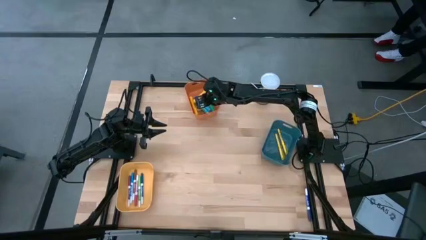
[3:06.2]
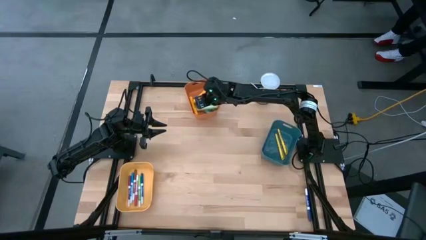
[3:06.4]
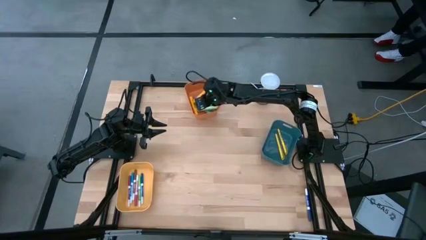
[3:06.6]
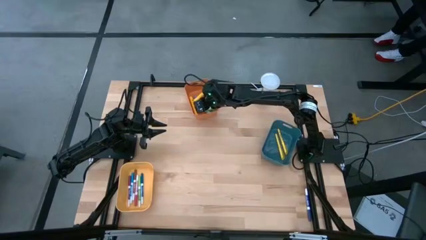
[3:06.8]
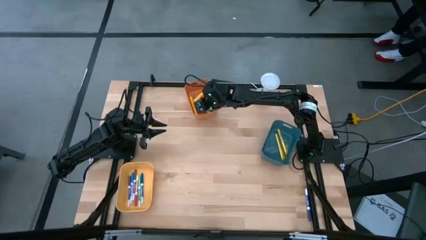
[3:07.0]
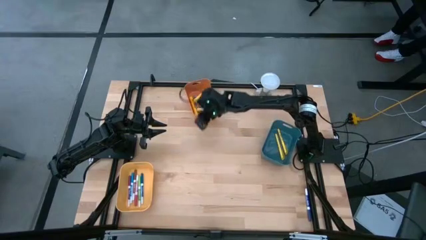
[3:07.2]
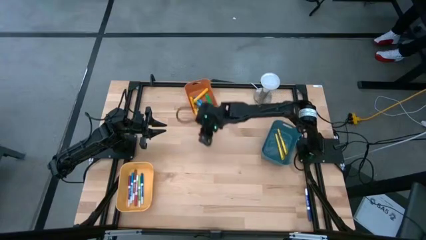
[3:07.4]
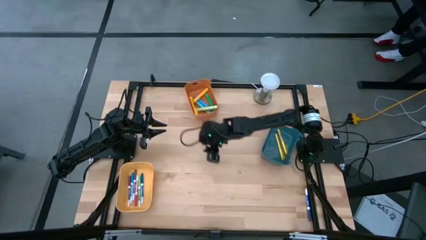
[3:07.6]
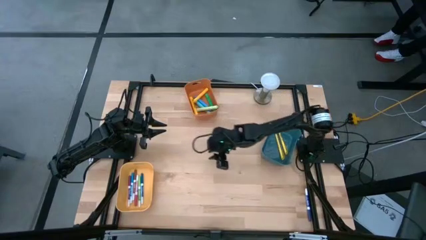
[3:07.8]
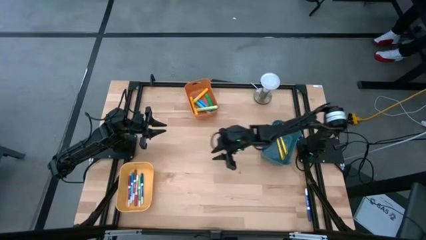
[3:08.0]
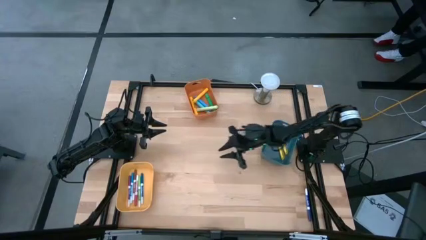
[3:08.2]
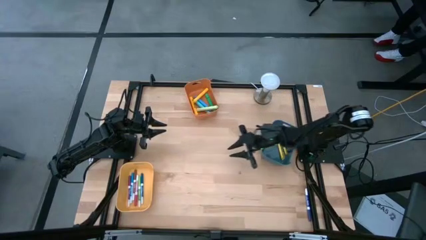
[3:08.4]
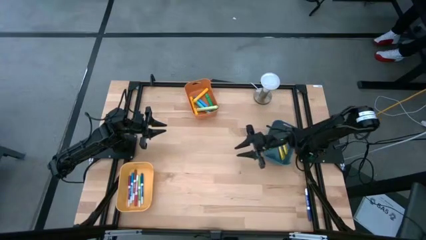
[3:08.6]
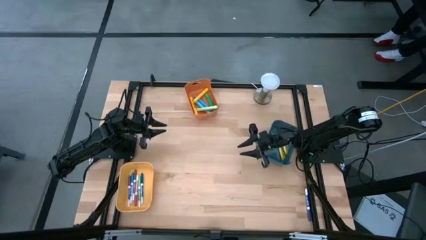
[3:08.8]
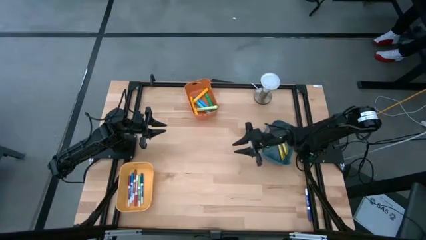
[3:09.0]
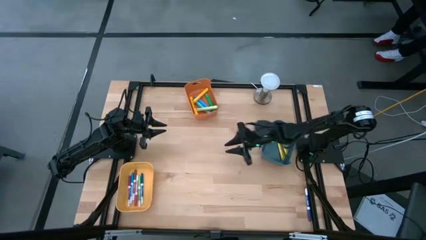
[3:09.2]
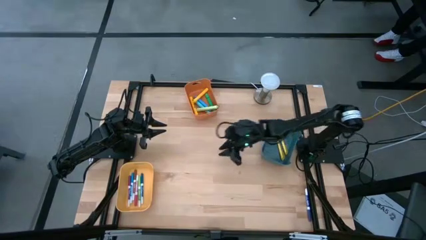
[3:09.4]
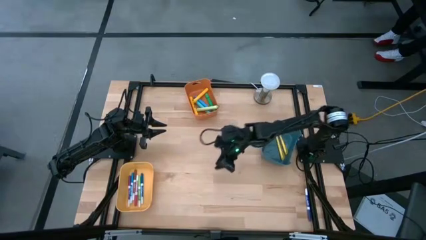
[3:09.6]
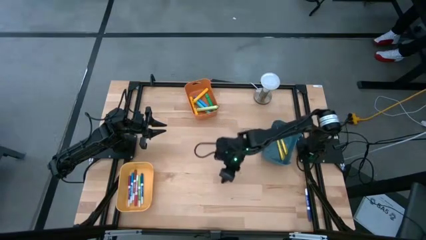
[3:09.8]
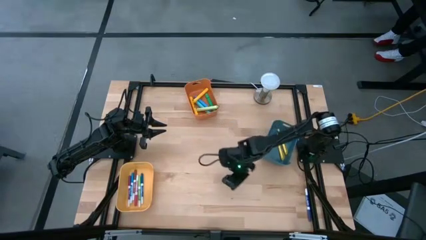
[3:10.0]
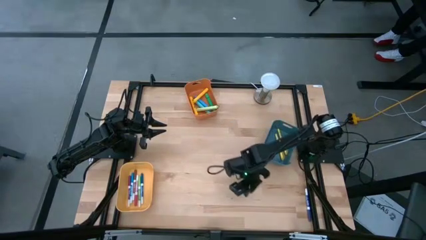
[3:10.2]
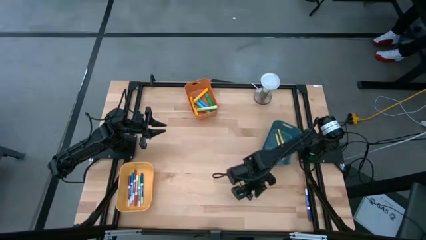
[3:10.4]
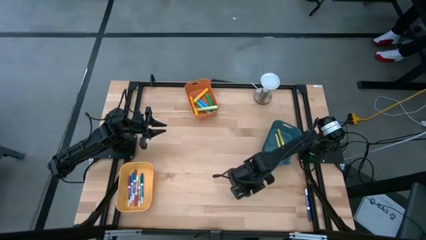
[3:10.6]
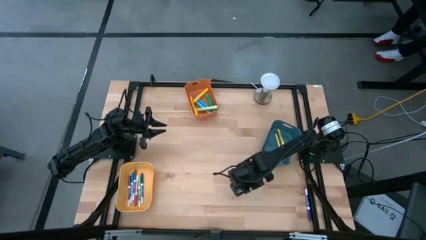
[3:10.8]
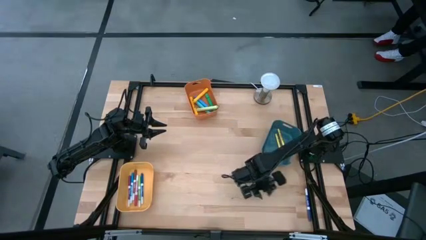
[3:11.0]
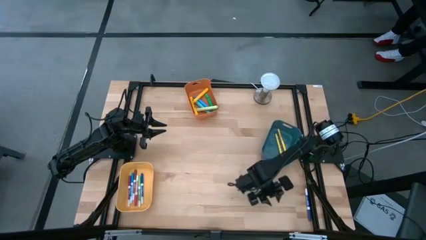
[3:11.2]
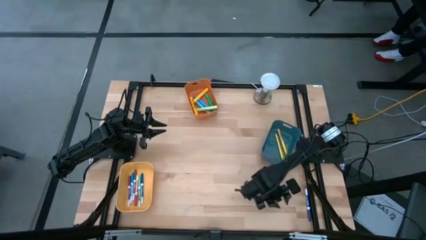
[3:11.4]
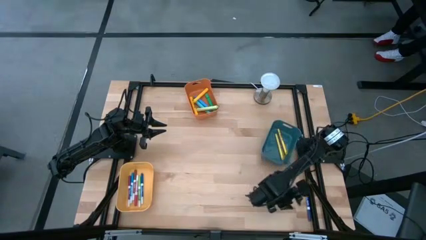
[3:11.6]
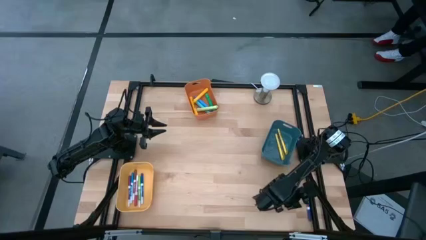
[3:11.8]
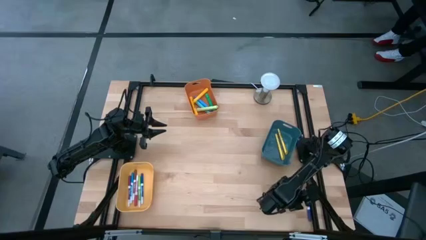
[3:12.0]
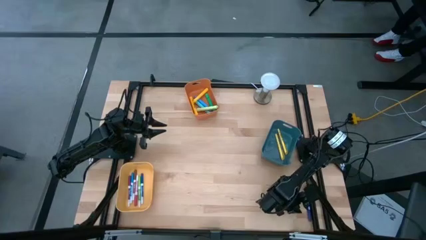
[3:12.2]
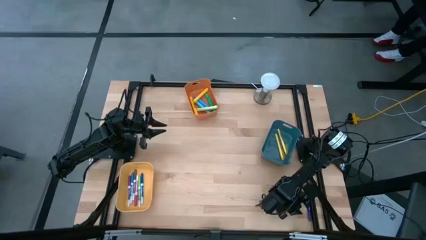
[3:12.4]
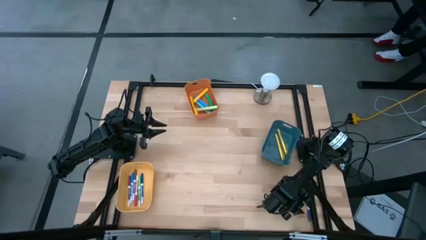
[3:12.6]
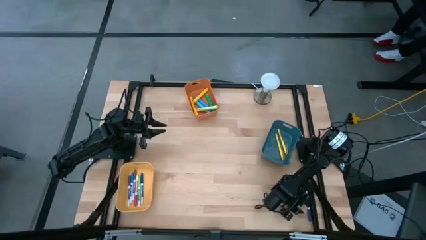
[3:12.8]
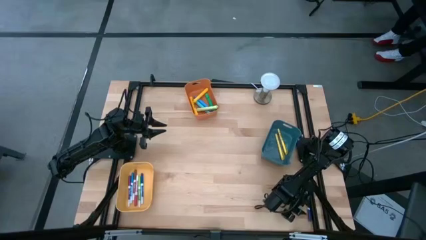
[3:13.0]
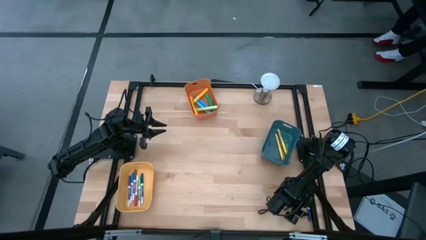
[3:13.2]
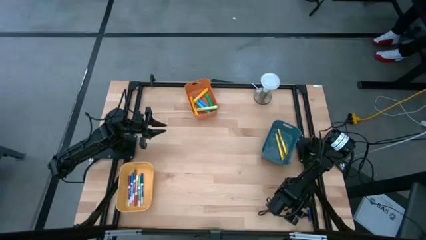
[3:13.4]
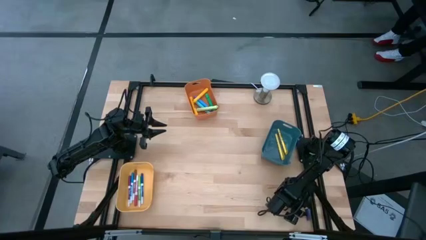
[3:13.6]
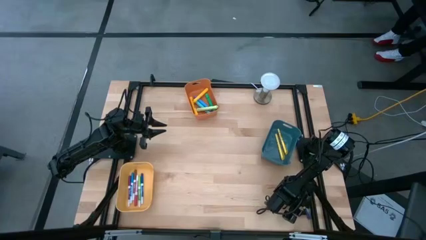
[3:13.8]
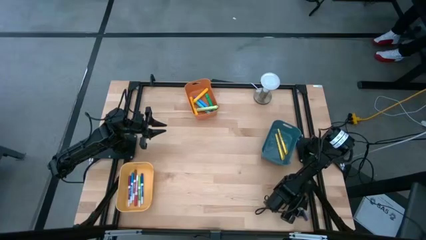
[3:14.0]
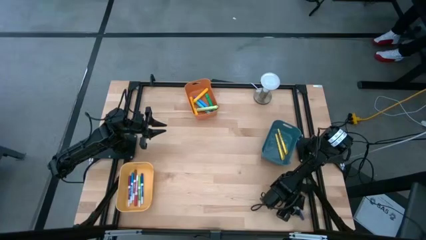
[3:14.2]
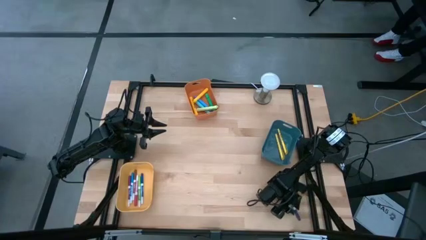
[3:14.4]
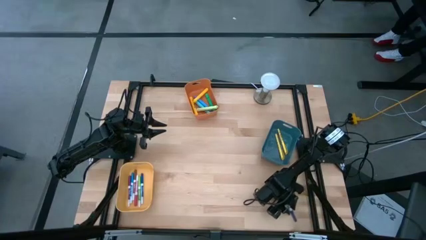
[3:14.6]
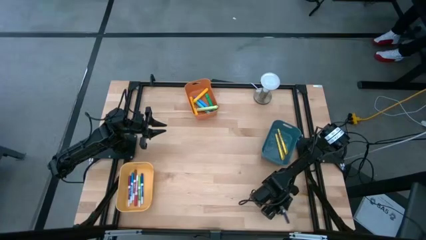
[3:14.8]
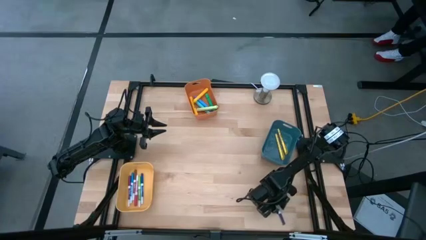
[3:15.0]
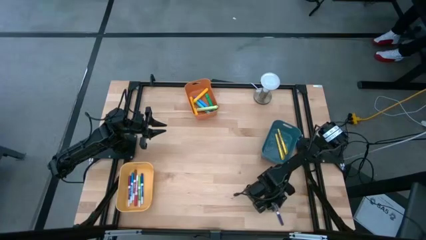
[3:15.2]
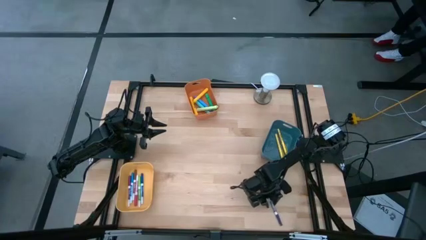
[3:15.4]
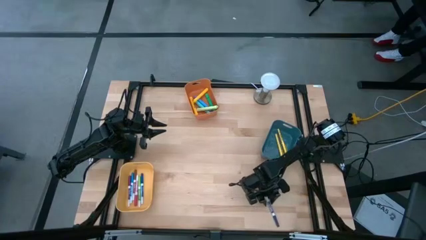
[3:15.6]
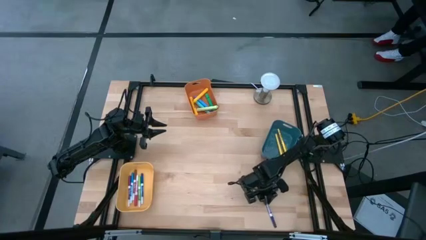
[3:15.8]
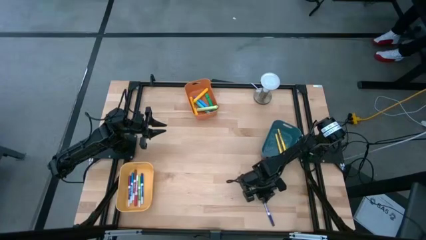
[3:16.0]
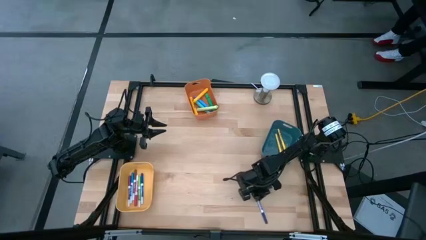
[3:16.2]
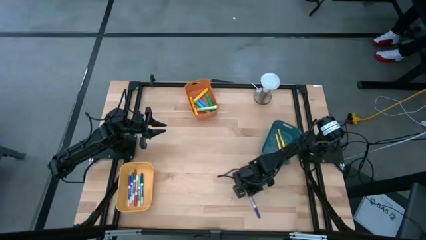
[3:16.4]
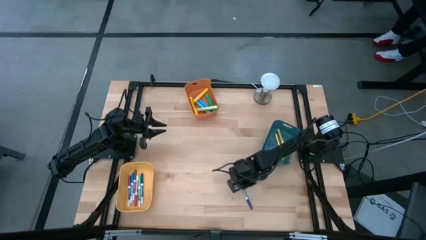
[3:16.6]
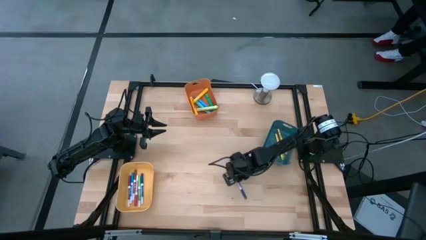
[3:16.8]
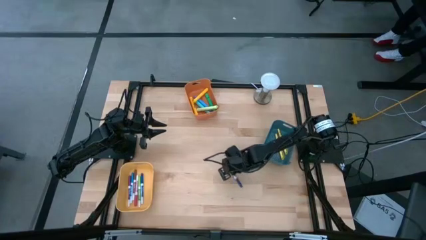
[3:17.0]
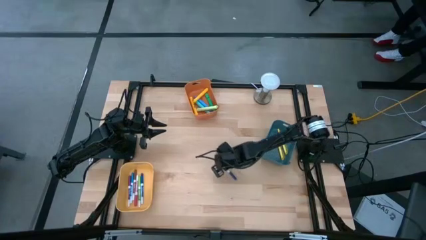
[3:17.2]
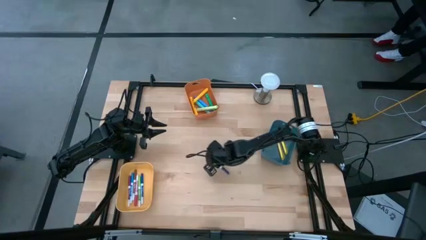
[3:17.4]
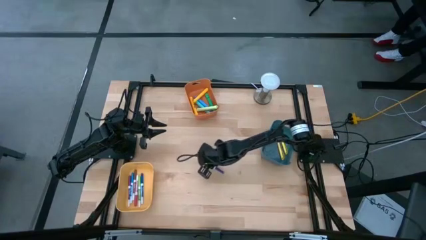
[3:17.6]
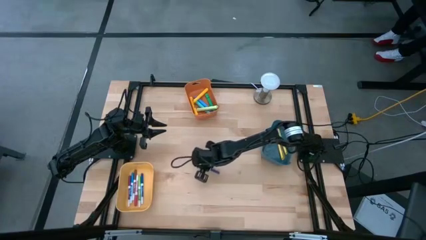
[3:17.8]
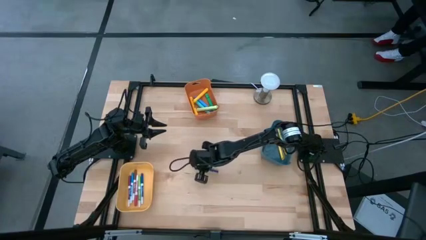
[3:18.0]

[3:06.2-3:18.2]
Task: Pick & Place Markers
Put the dark blue marker pen into the yellow bin

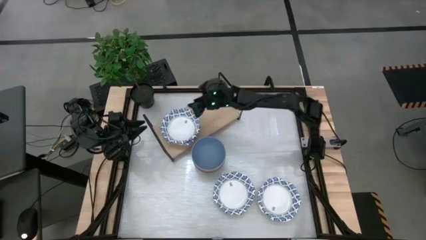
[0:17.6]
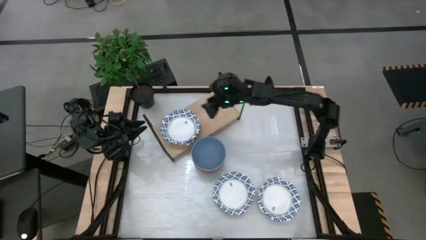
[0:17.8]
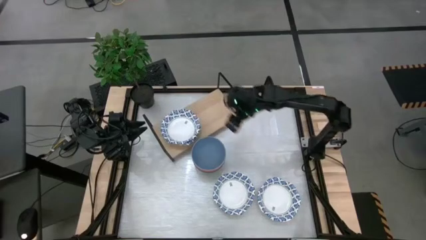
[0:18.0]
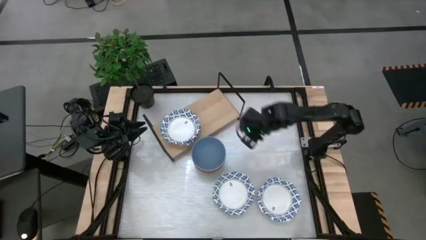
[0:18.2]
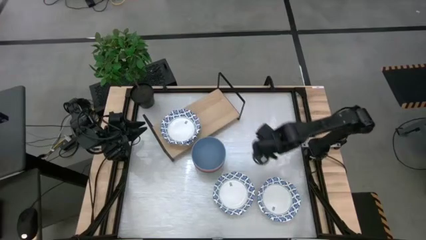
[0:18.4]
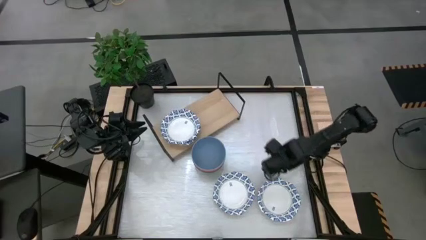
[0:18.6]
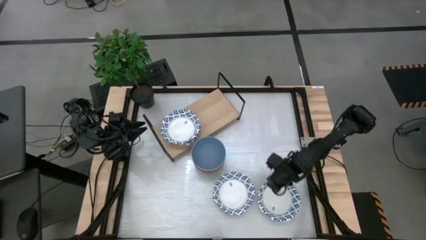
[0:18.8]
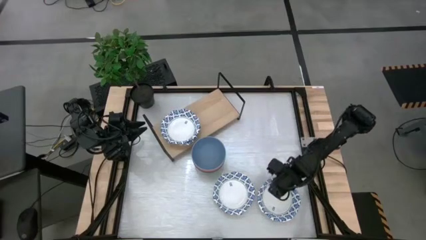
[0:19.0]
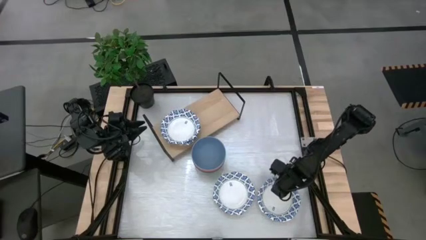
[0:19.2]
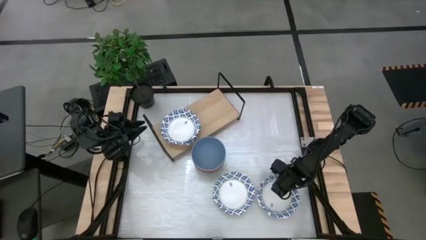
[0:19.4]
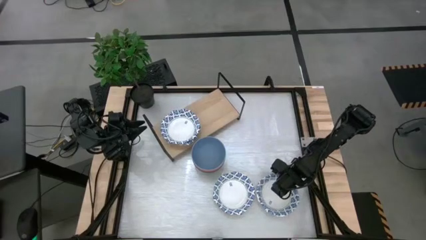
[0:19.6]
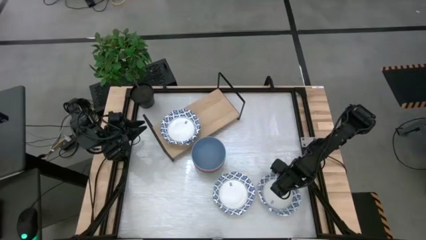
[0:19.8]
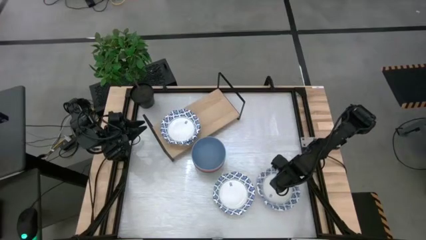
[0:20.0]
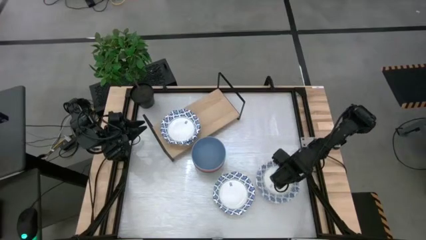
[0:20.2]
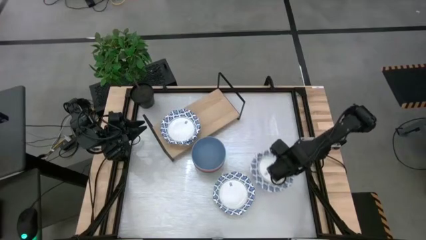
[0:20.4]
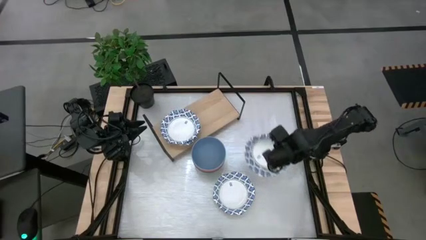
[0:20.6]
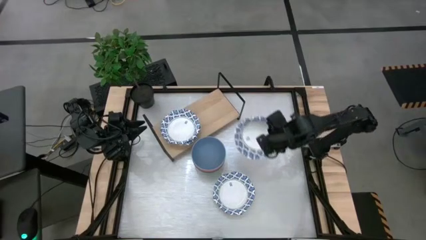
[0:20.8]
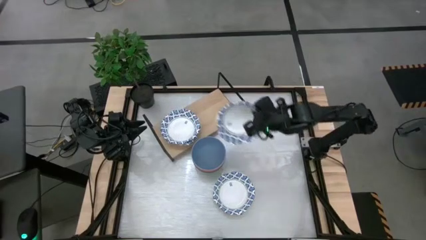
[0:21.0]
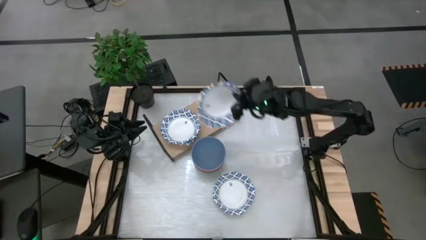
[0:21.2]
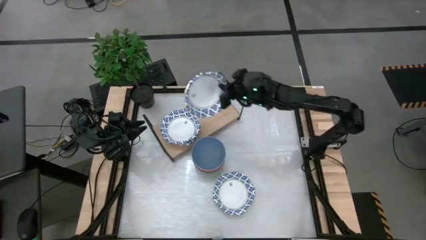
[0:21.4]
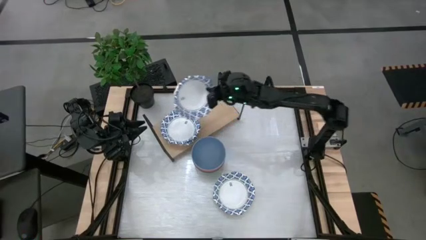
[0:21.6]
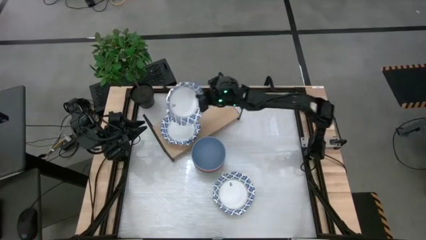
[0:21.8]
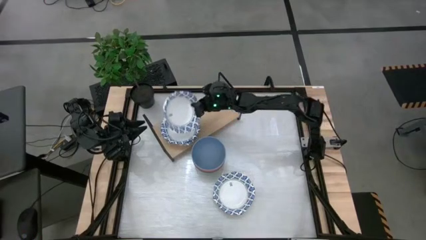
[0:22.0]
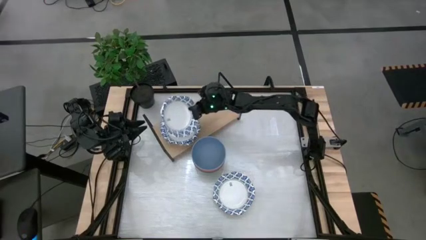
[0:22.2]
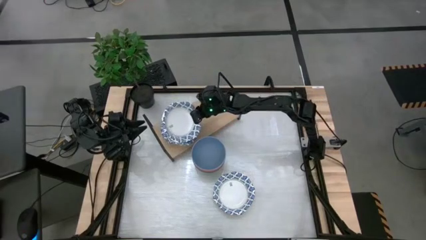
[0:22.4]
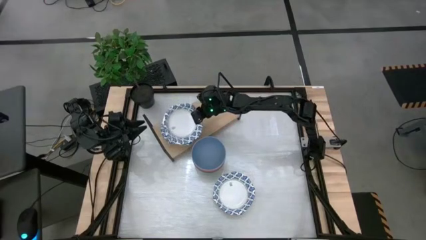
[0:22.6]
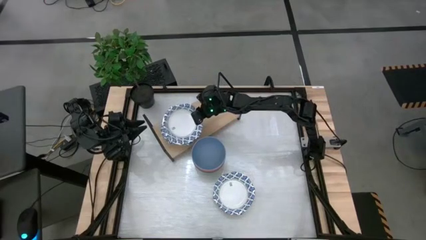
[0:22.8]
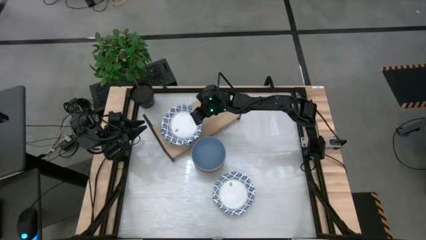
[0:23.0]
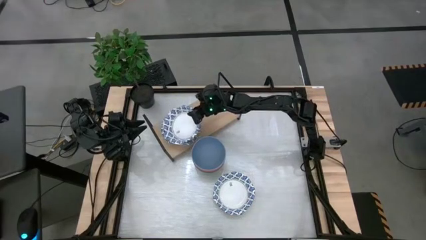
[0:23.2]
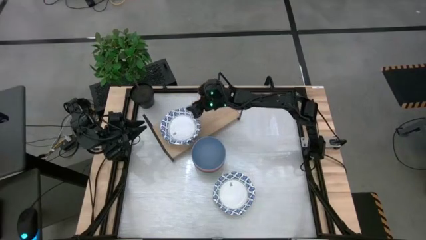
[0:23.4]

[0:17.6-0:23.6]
Task: Place and stack bowls onto a shelf
Stack the white blue patterned bowl on top of the white blue patterned bowl on the shelf
